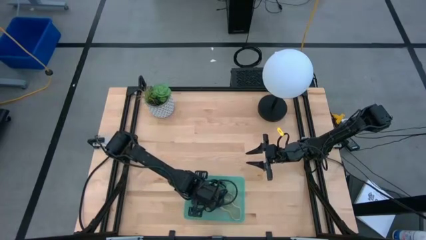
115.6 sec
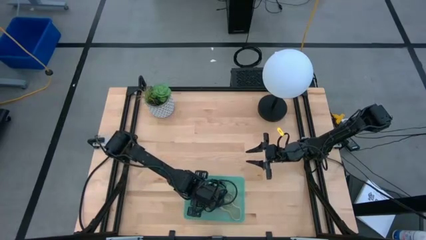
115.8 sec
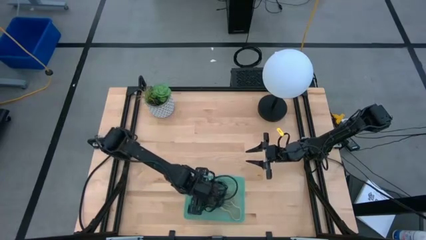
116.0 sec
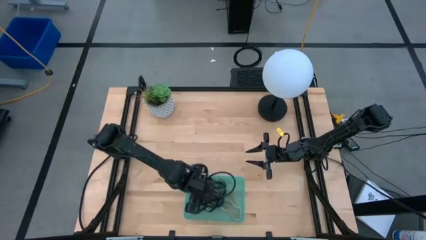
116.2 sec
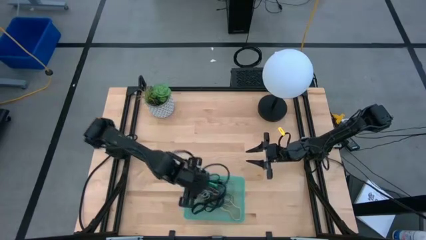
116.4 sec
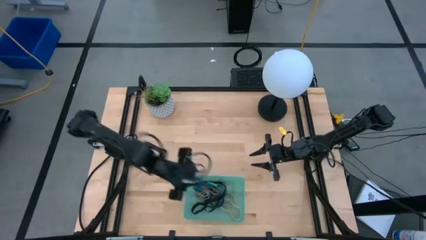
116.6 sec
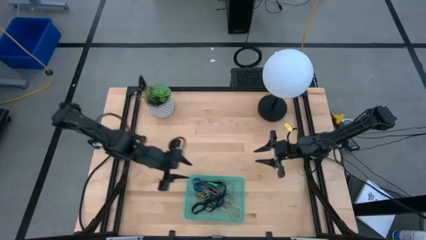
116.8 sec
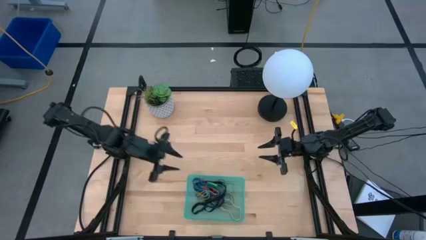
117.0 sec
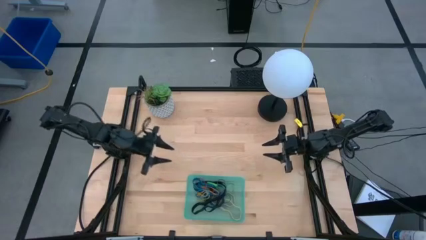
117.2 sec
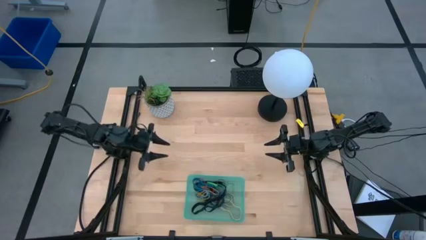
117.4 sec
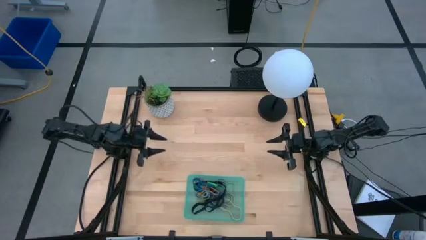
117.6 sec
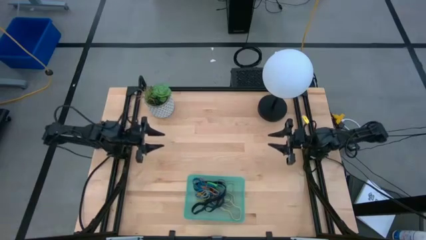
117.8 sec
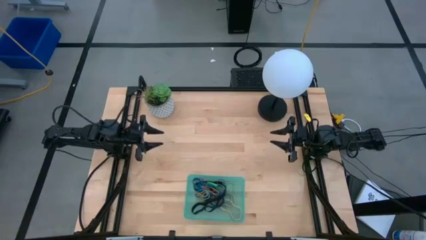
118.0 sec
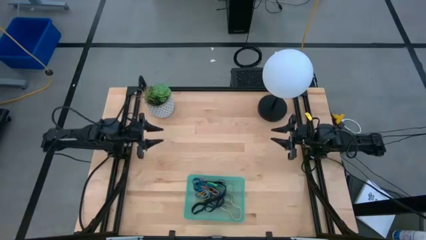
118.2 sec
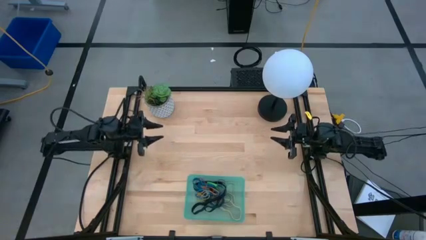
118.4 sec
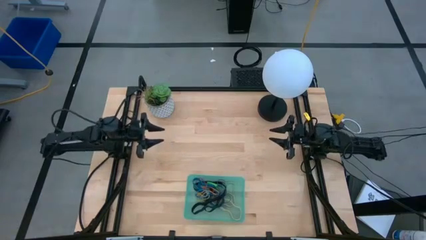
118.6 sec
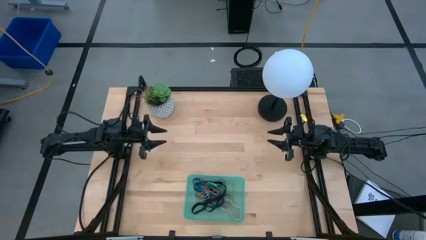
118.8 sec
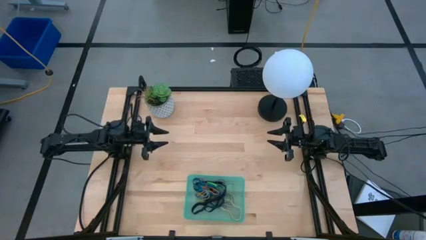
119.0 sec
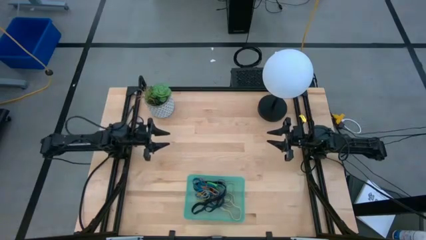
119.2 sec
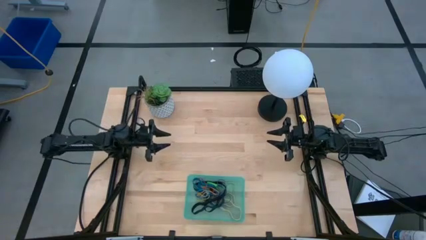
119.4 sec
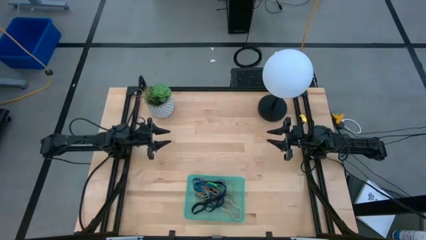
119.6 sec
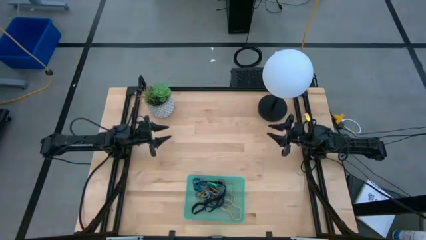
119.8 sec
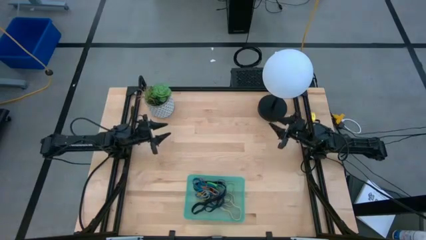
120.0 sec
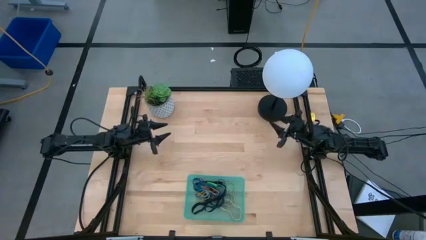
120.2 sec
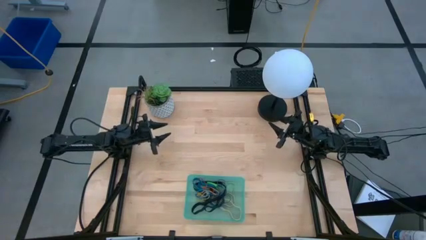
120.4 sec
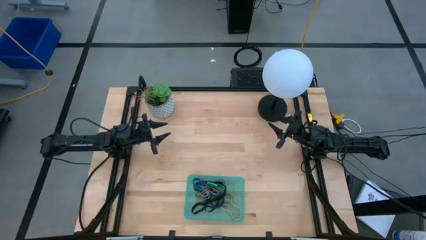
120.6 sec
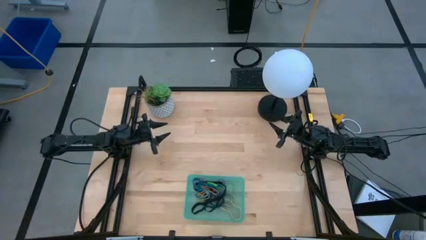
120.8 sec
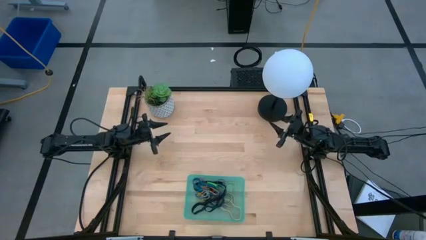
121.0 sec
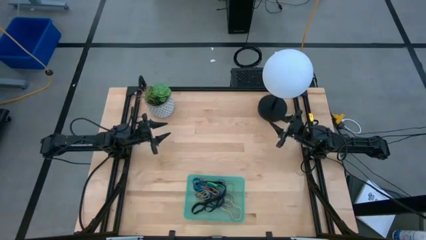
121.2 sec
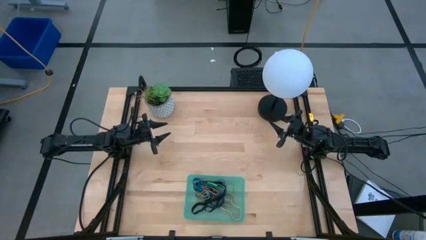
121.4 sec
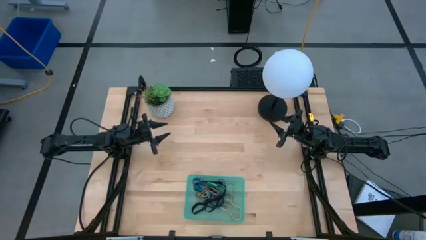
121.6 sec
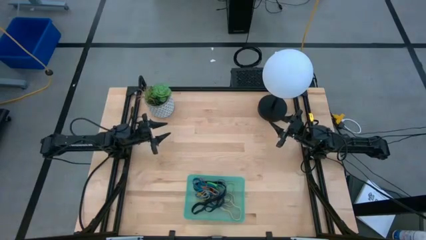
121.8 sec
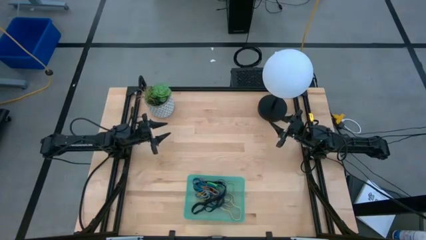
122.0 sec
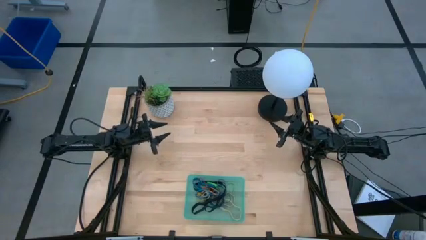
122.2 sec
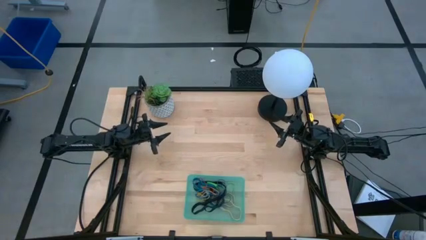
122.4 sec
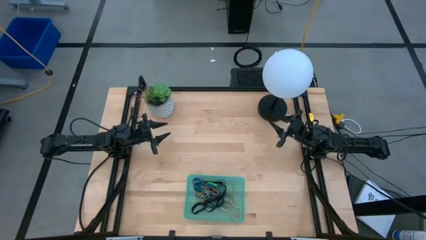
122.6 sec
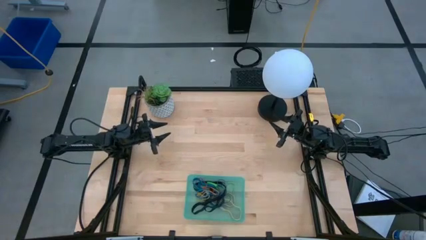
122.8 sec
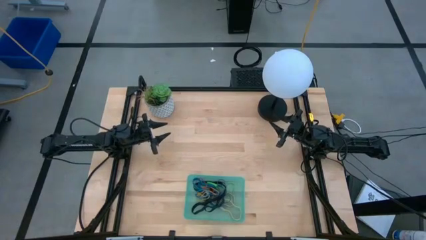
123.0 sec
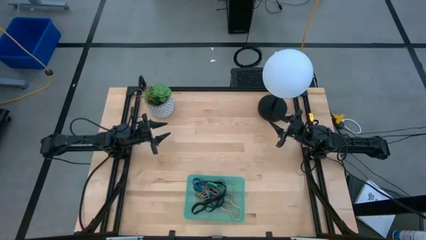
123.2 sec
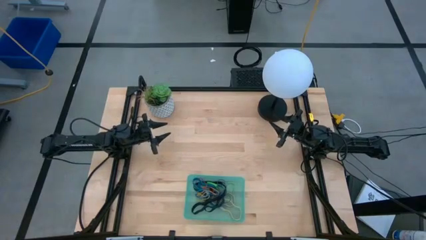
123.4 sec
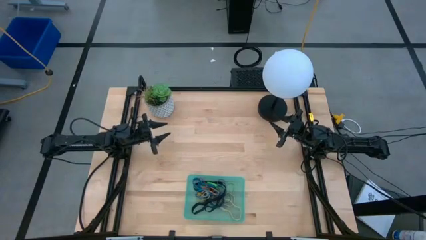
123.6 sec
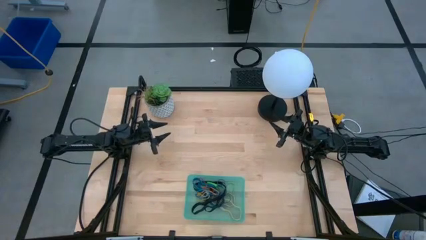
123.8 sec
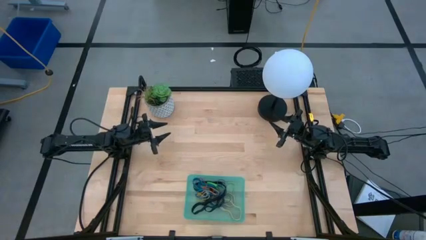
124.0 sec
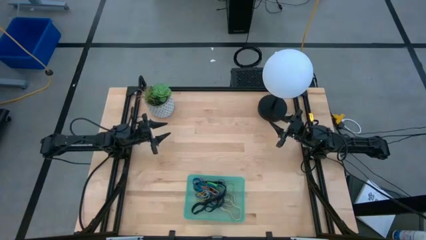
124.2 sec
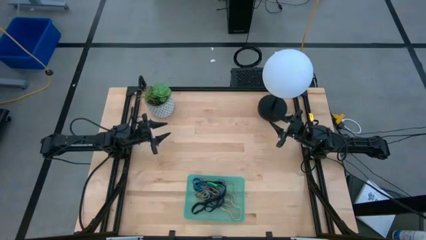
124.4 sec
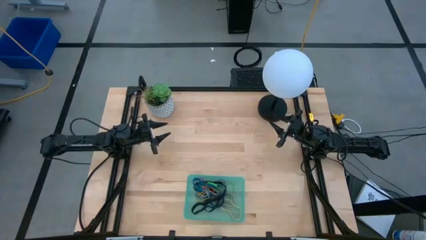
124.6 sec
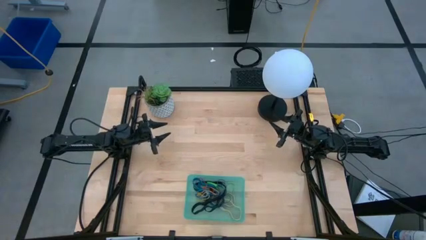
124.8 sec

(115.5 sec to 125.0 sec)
Task: Pick and place rubber bands into bin
Return to Home Position

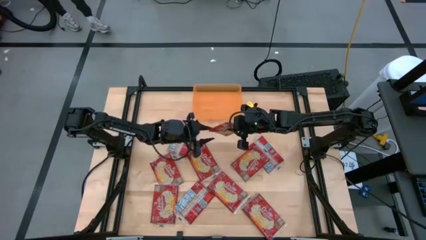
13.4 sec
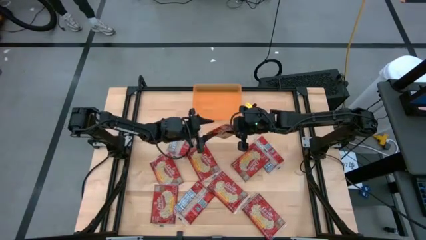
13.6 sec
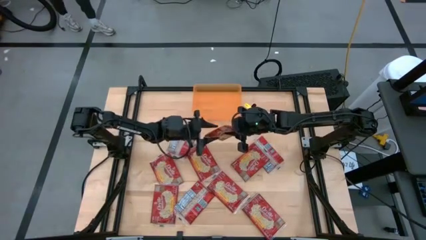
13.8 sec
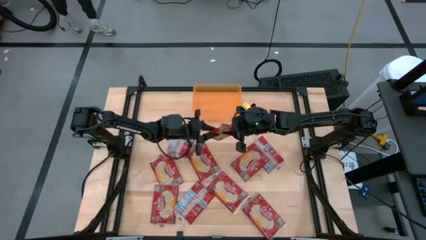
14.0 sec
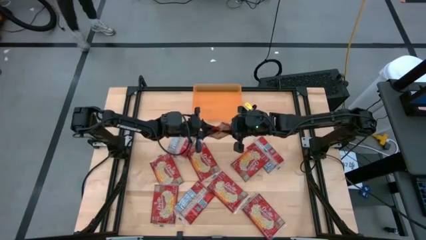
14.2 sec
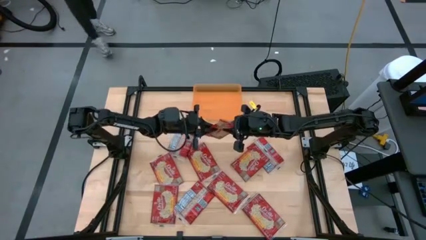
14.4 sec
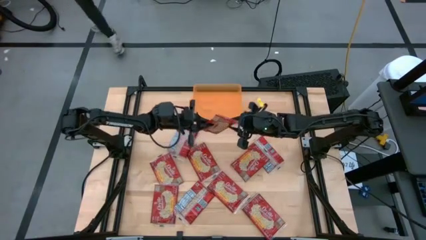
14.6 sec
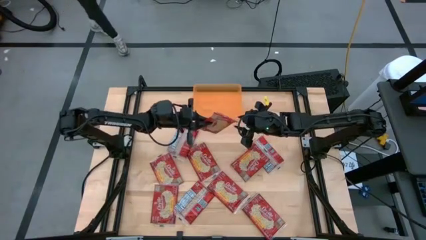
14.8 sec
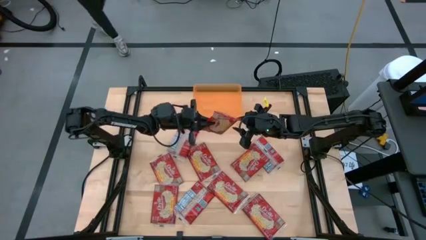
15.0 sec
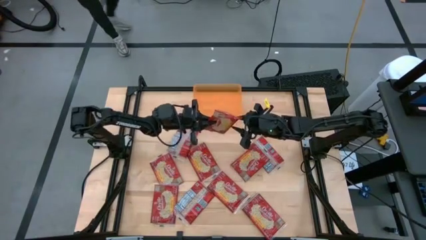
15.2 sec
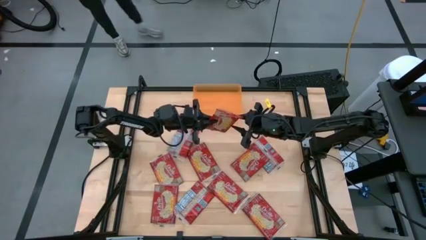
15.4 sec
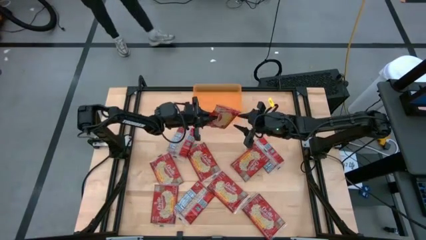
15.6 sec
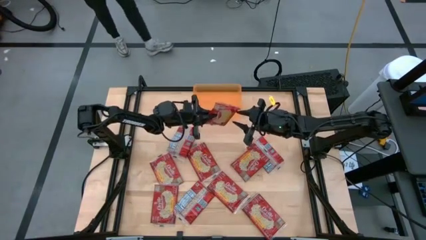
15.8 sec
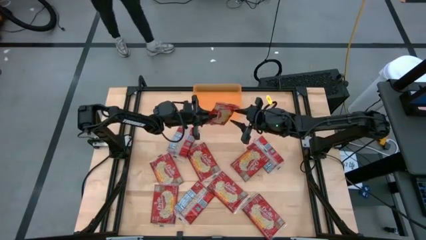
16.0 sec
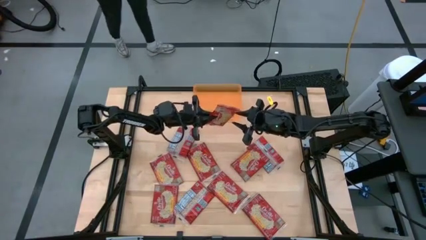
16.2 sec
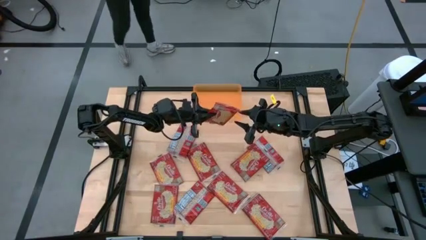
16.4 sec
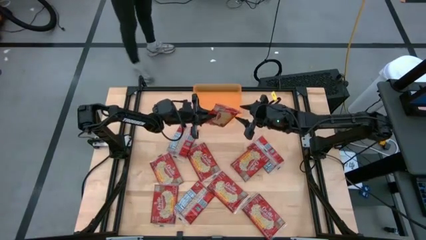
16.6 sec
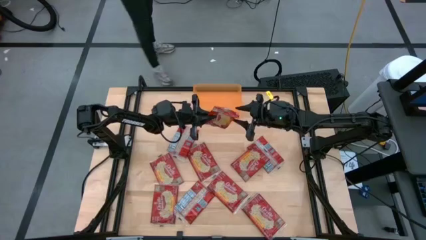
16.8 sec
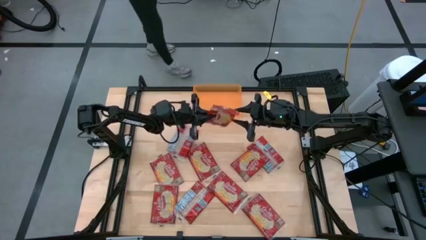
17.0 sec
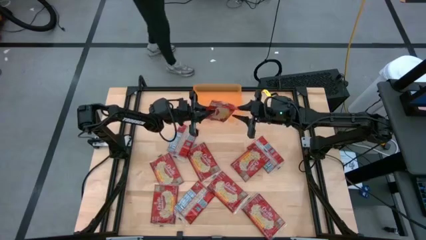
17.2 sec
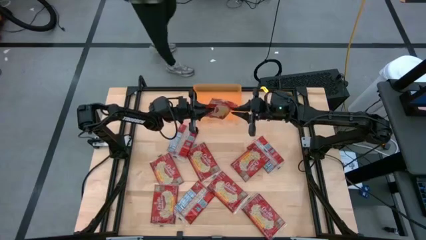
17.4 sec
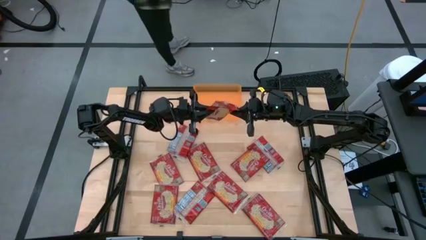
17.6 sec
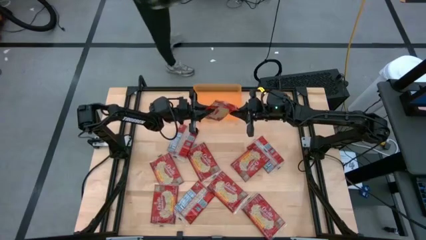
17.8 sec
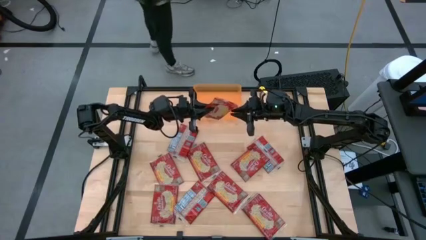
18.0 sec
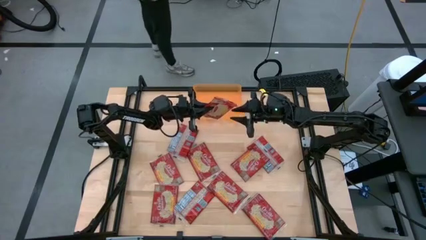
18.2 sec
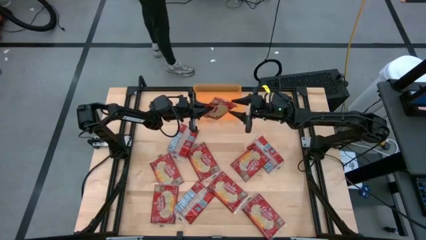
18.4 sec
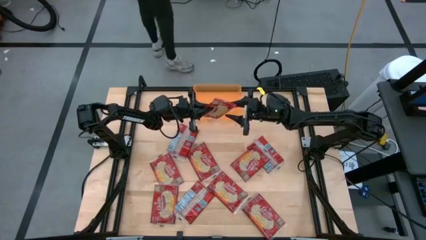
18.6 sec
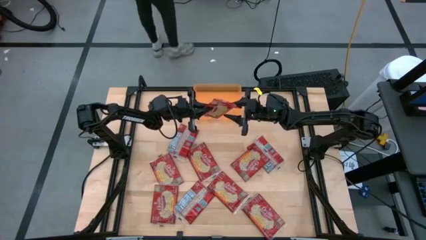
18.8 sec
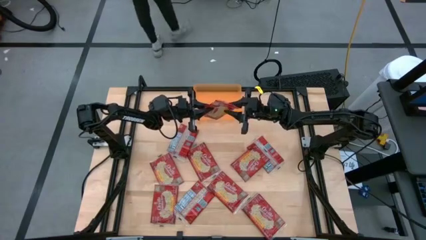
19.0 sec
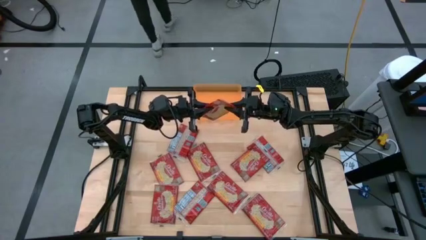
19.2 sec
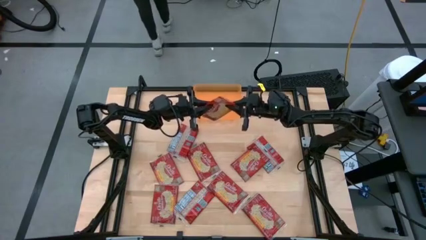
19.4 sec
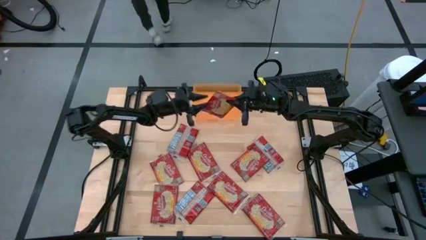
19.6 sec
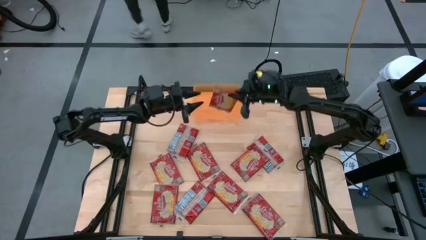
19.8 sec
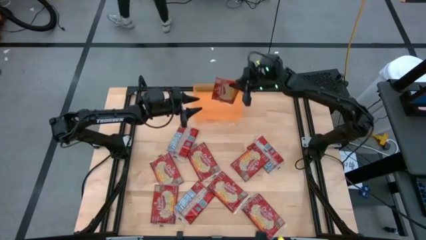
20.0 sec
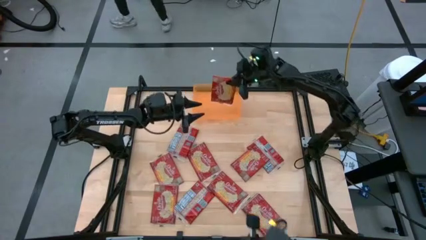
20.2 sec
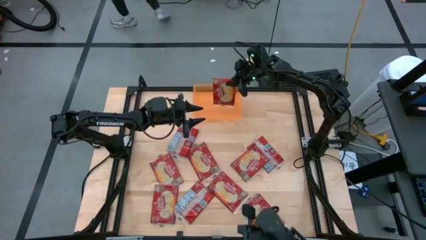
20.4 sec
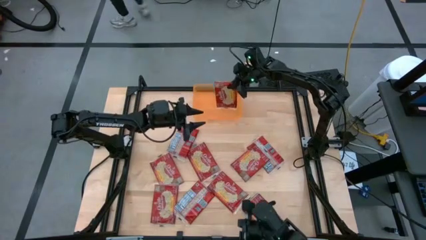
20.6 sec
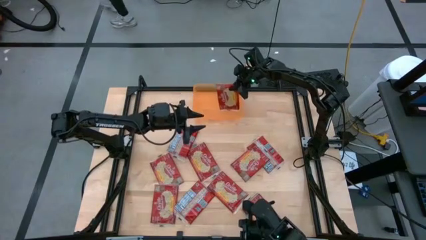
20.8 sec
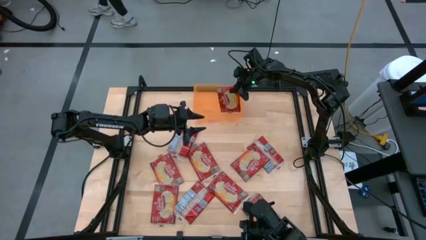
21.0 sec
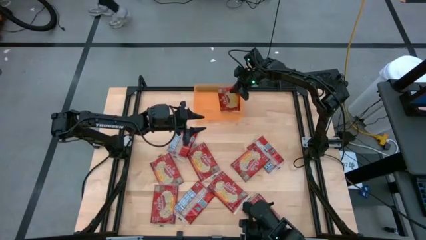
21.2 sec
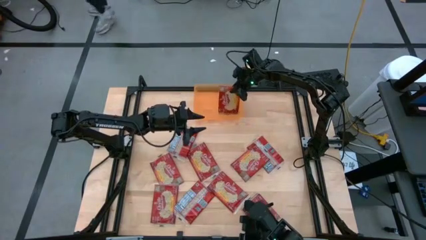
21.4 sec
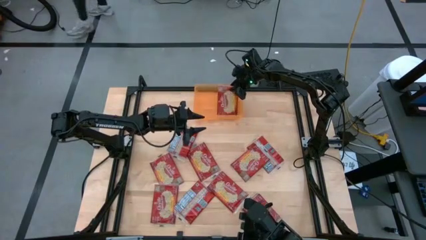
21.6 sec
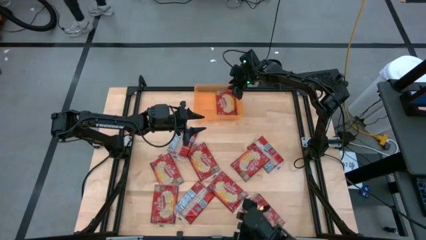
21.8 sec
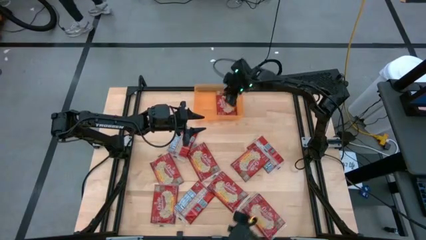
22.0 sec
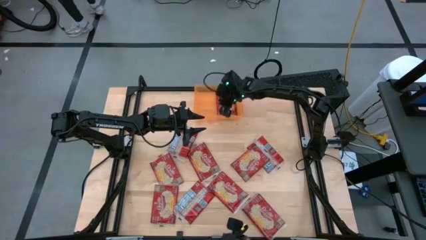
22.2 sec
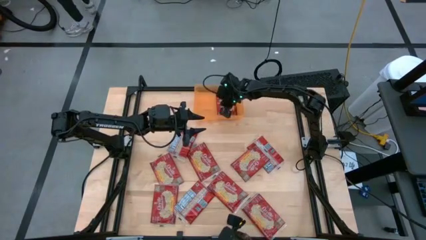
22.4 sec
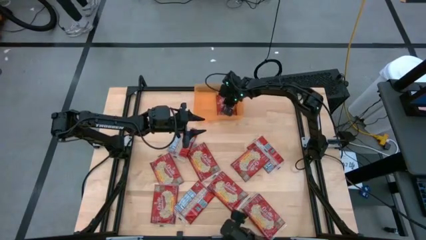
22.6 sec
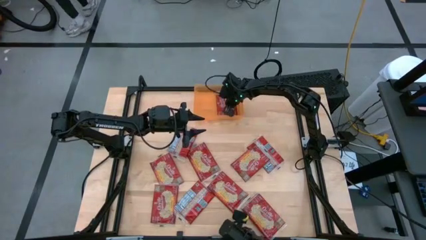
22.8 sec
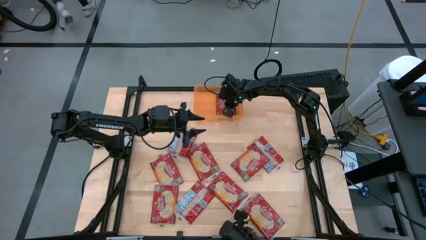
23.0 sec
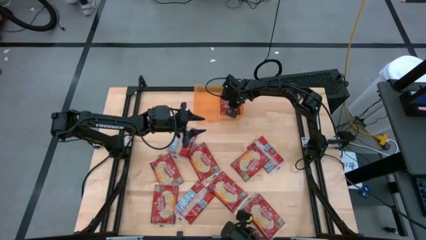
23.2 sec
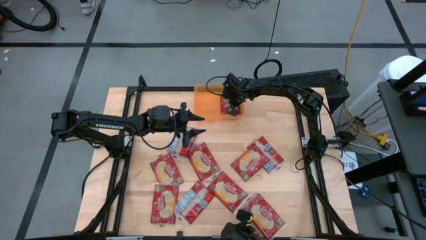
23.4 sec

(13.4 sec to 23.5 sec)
Task: Sort popcorn bags into baskets
Put the popcorn pack into the orange bin
